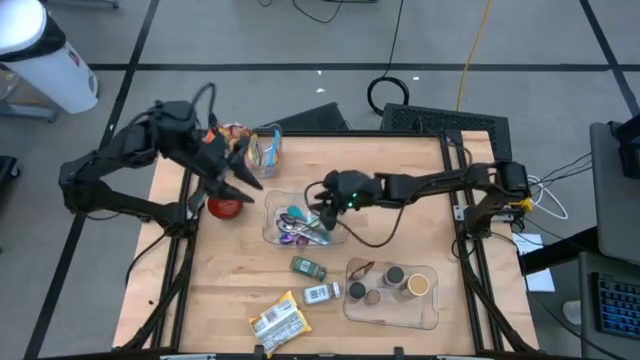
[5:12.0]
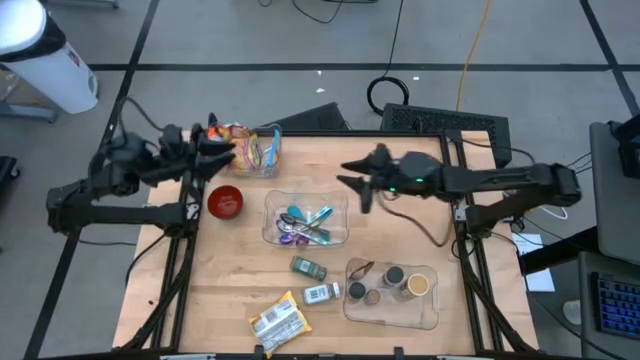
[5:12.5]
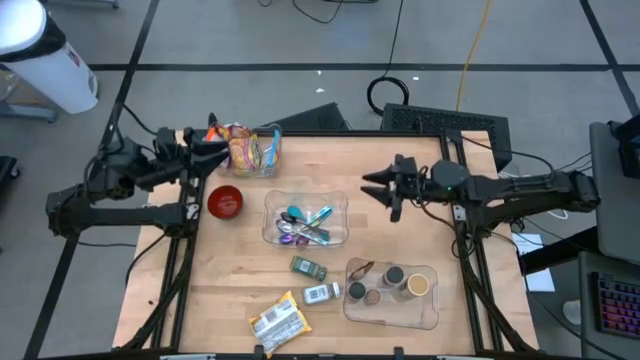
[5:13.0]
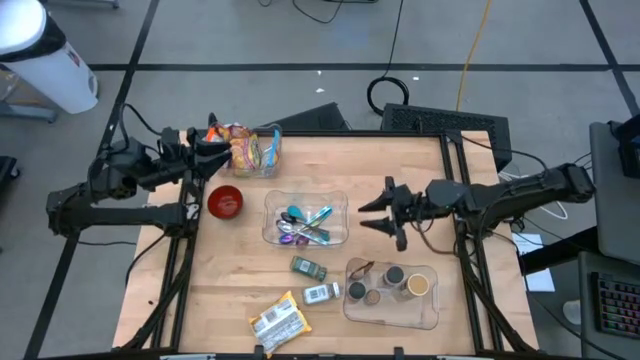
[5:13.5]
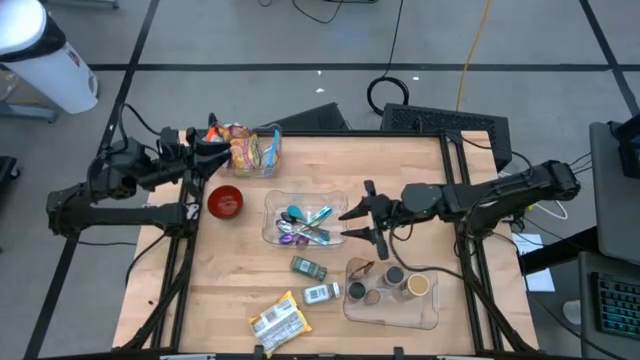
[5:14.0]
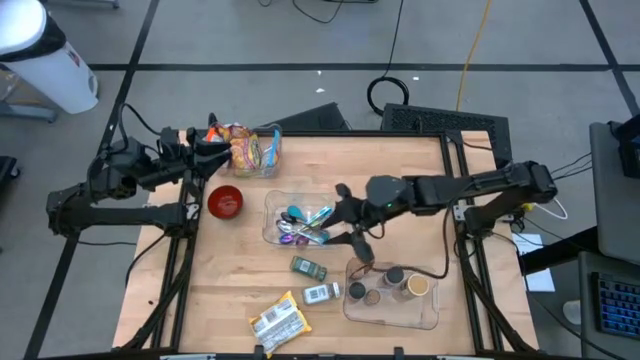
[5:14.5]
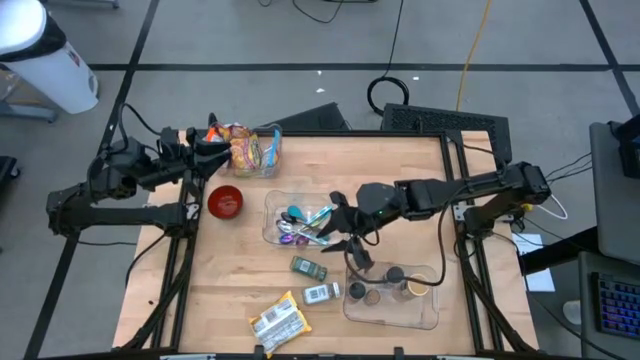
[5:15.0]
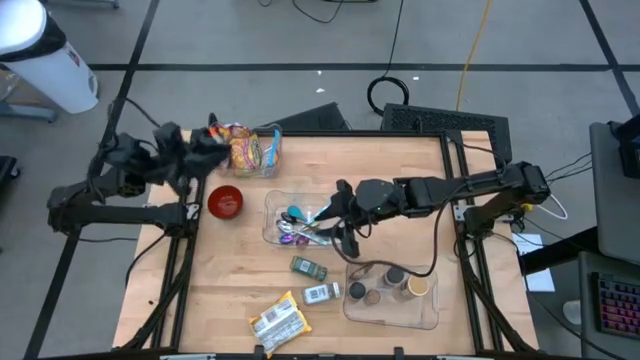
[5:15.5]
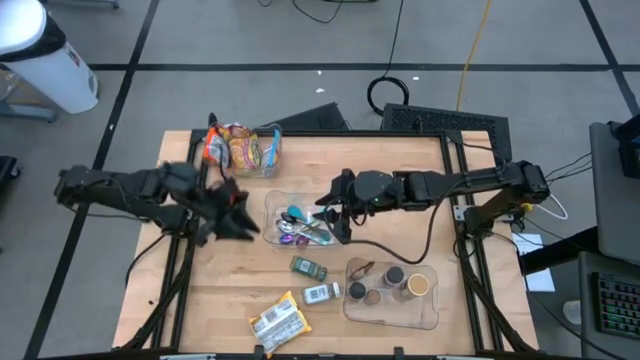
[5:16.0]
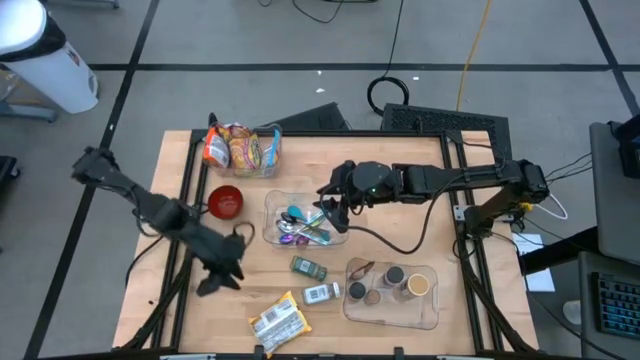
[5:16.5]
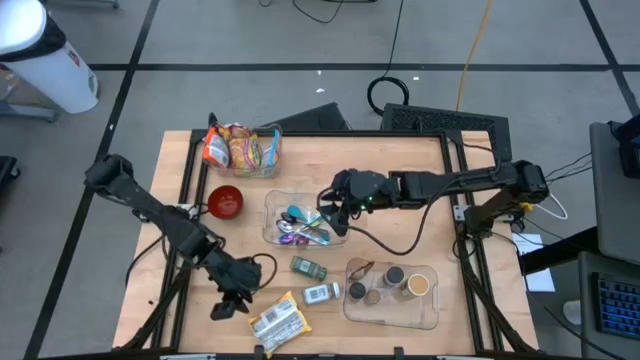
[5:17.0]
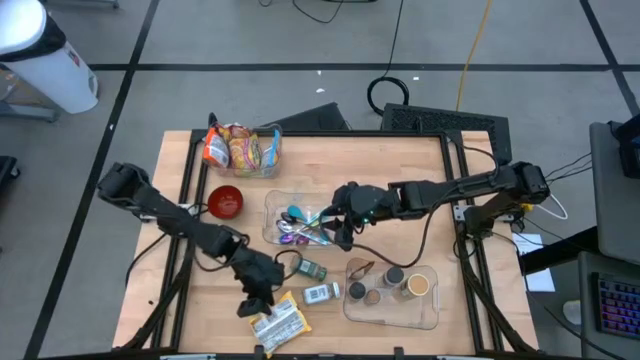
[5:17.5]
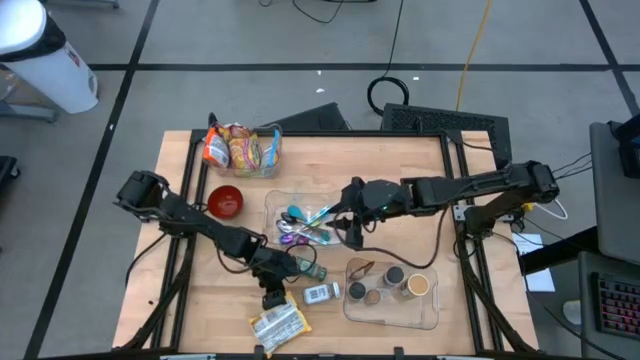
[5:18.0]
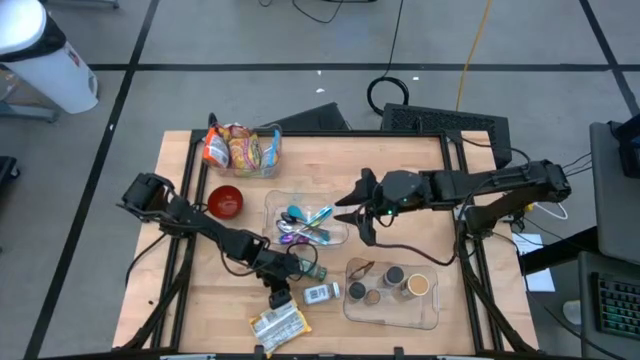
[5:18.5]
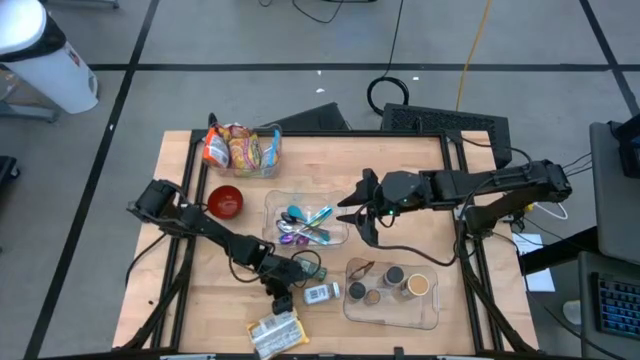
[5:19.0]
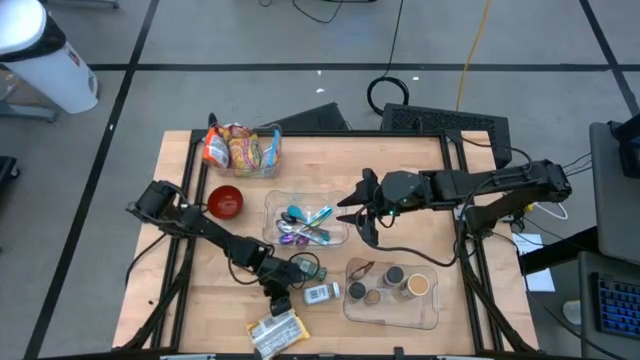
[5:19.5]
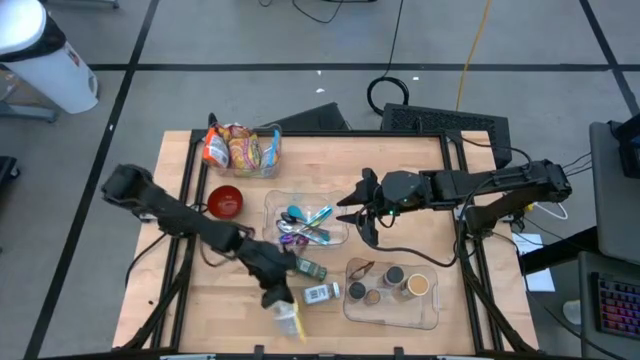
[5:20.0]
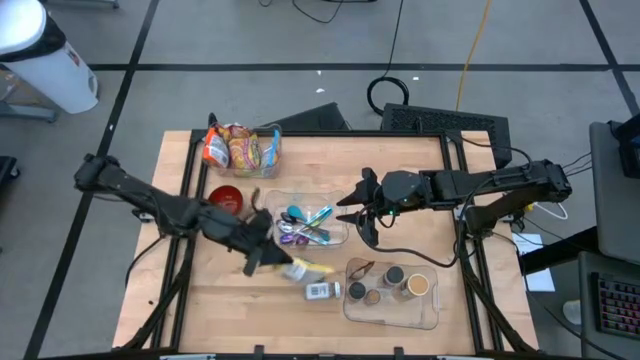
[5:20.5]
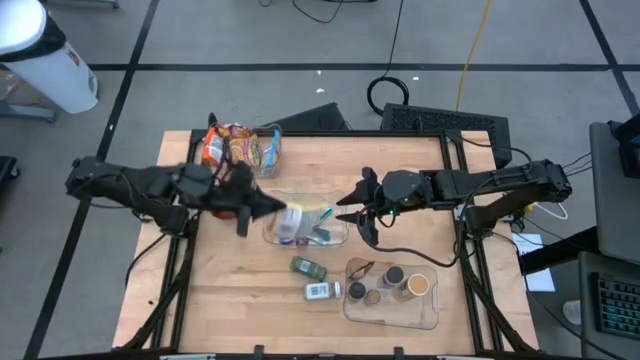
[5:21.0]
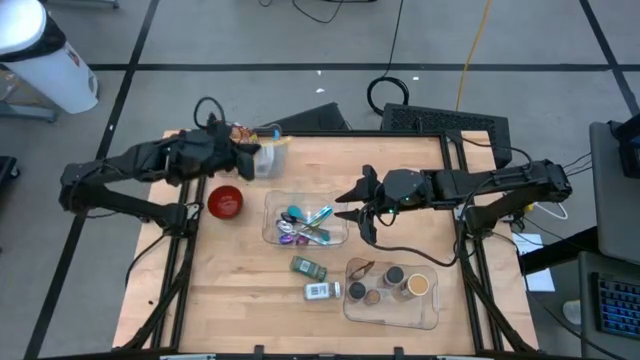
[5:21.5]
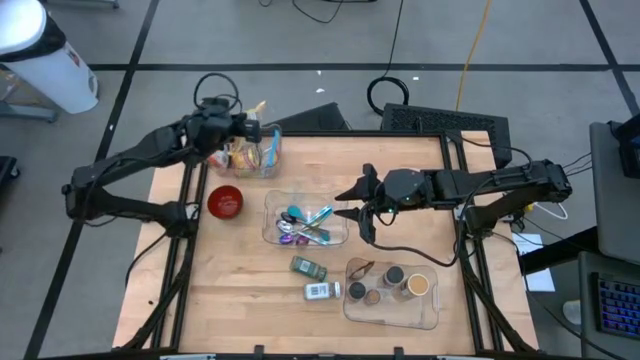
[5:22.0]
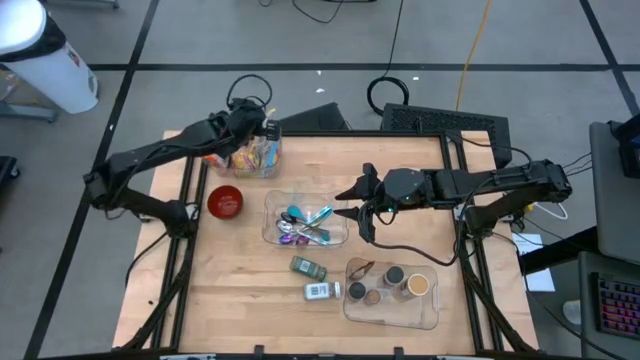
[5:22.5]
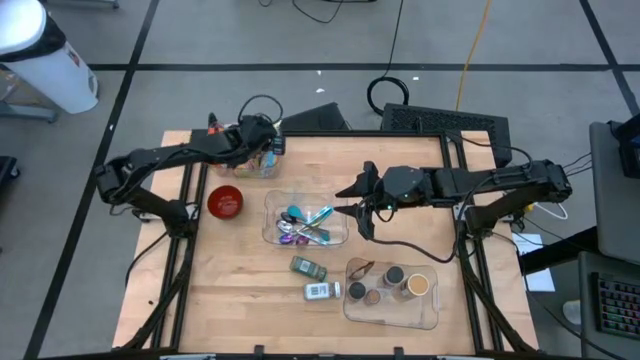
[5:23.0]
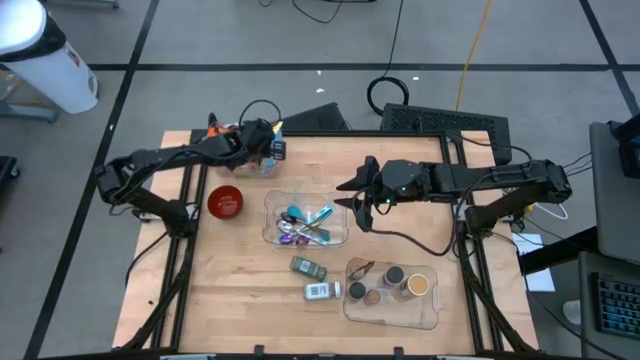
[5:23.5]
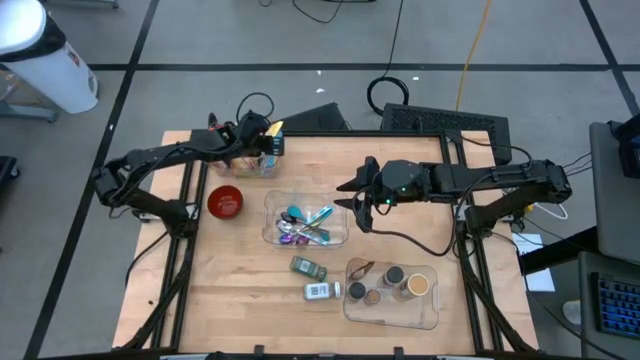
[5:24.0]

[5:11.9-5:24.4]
Task: Pick & Place Food Item
Put the yellow noodle pack into the top transparent bin

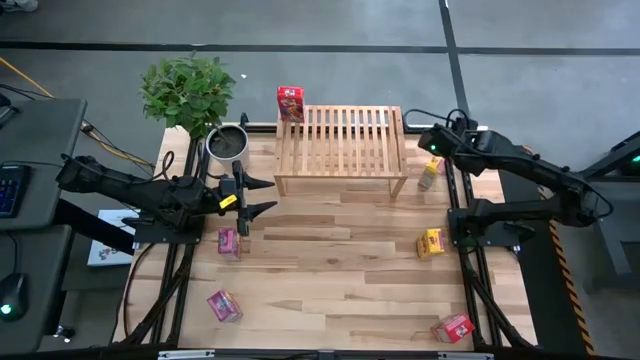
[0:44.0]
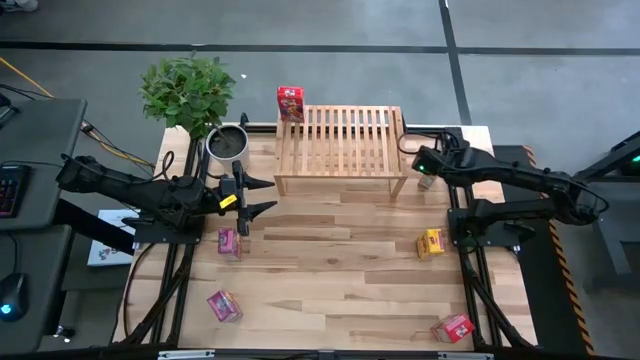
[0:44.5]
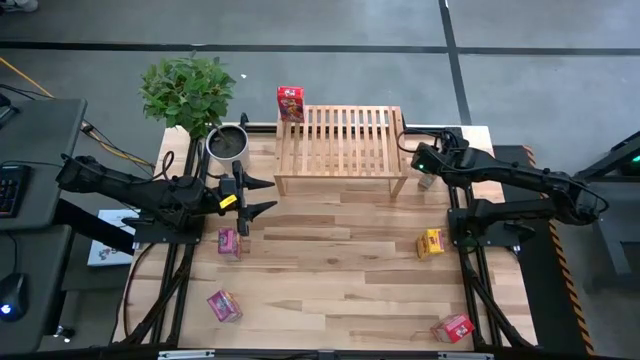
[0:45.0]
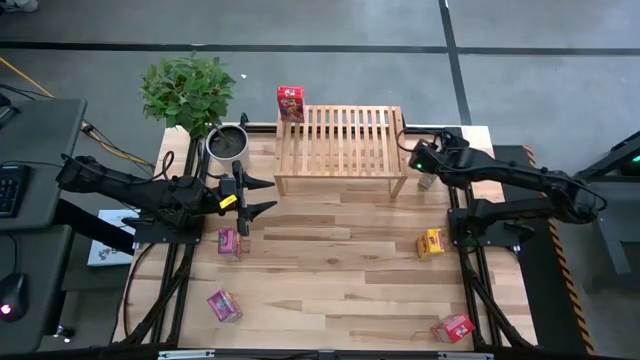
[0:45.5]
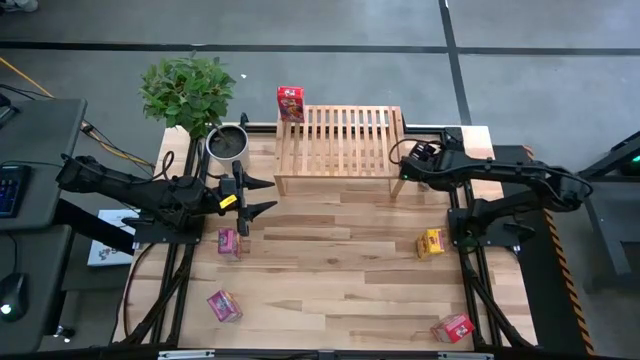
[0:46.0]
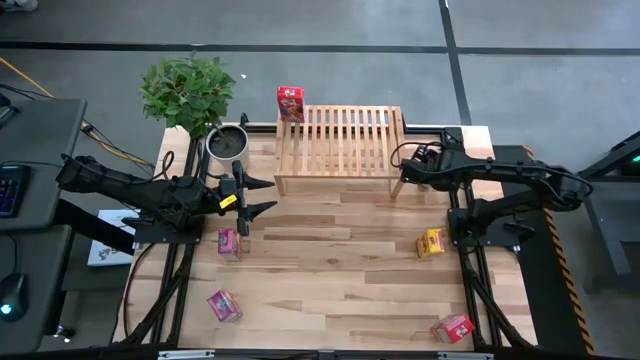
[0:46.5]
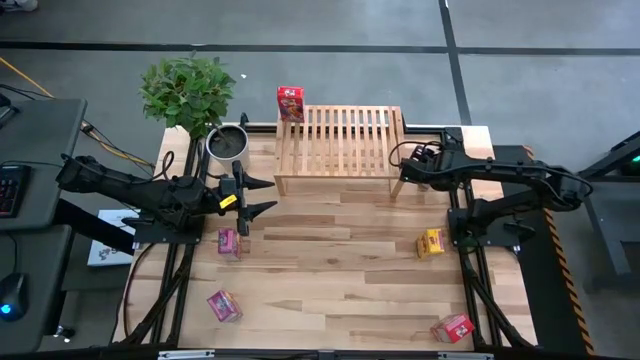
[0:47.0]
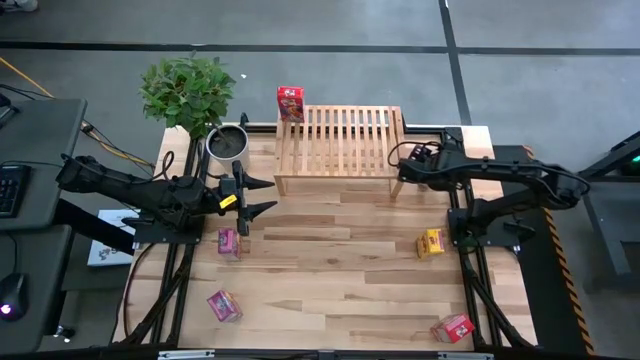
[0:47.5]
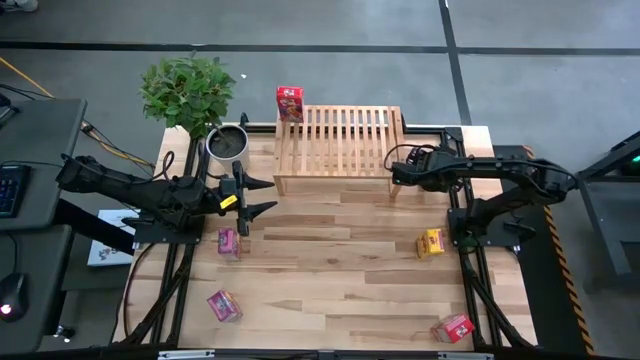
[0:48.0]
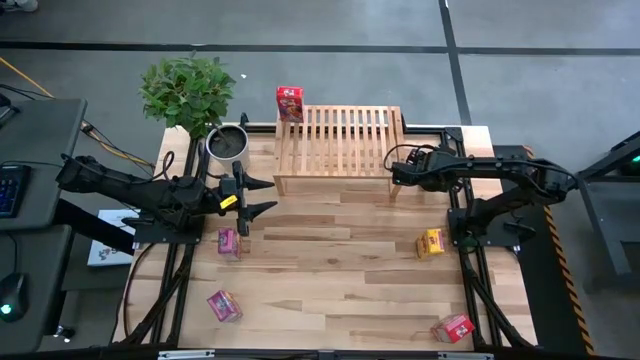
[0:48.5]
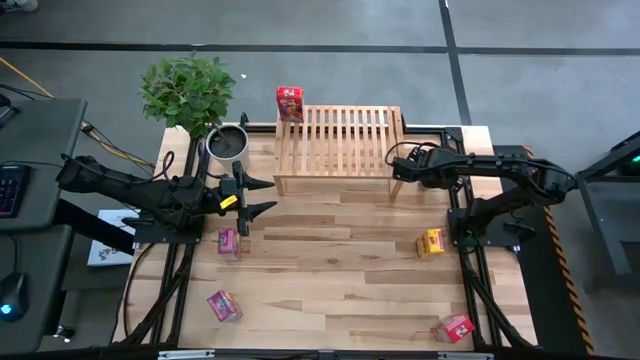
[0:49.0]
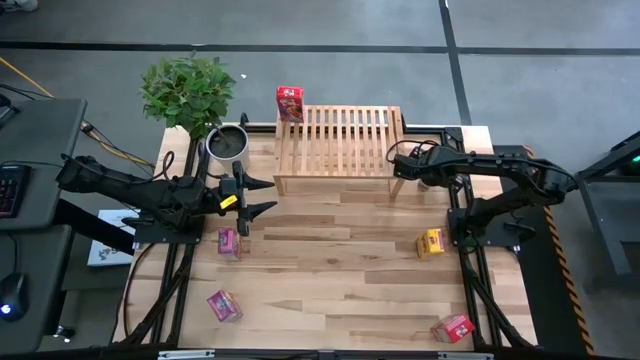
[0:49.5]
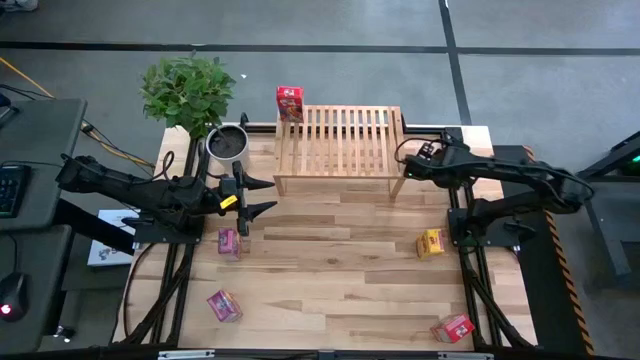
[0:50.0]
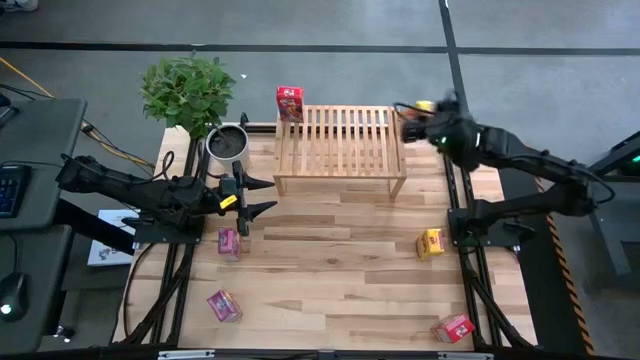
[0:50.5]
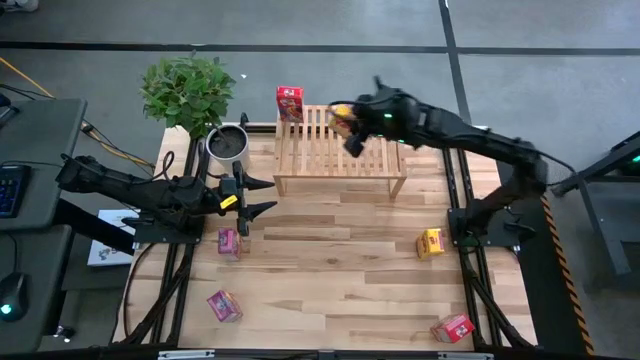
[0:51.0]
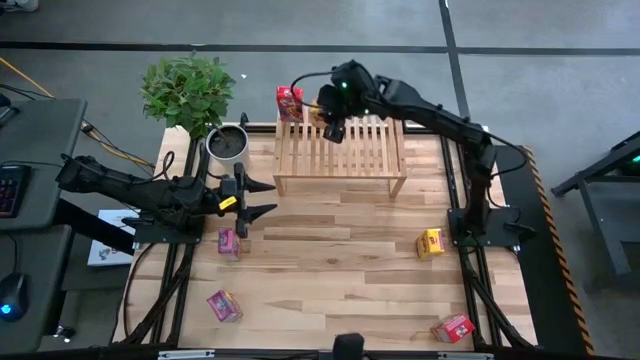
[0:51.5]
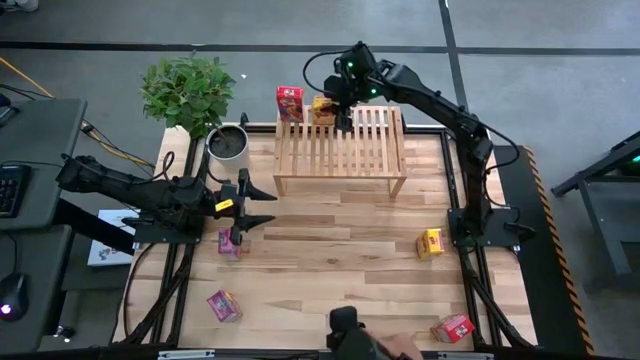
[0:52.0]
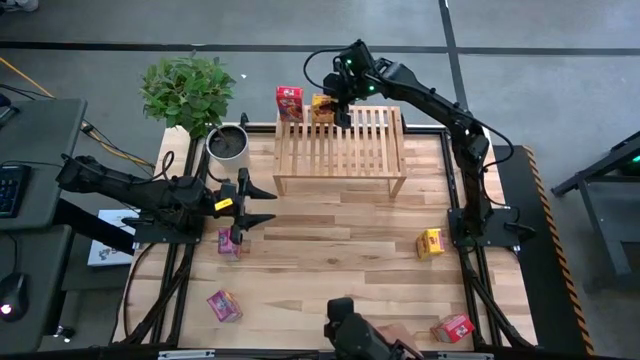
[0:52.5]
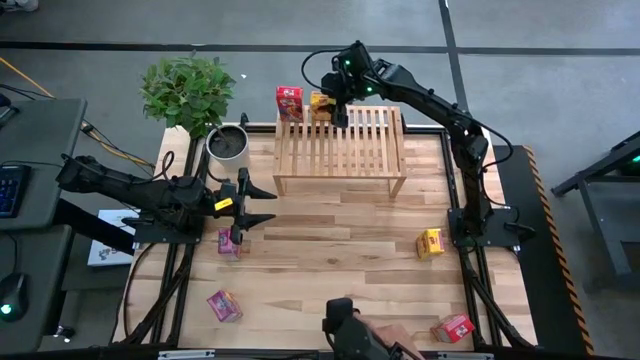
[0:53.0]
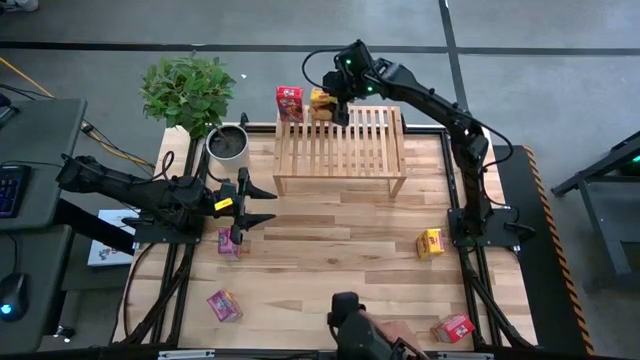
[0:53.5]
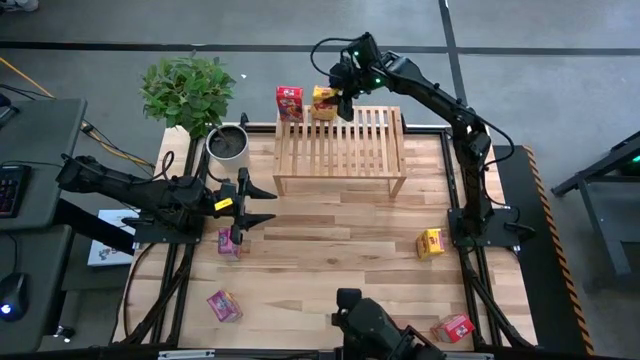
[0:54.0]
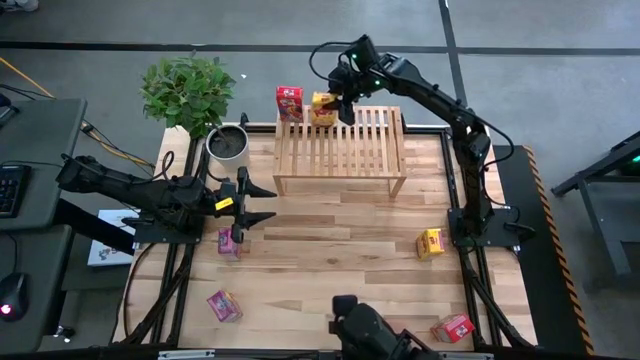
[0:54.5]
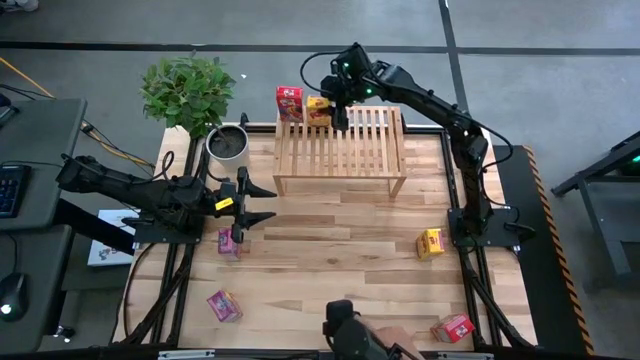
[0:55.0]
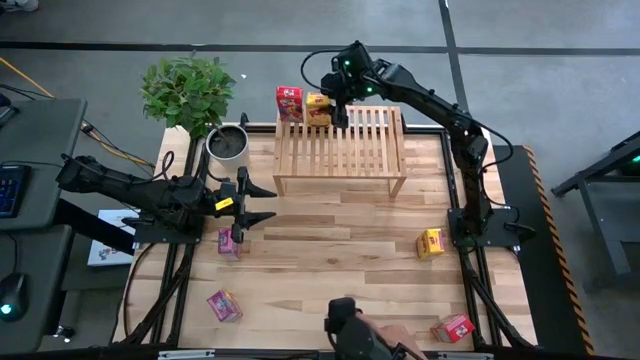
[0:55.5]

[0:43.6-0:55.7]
Task: Stack cereal on shelf
Put the top yellow cereal box on the shelf
